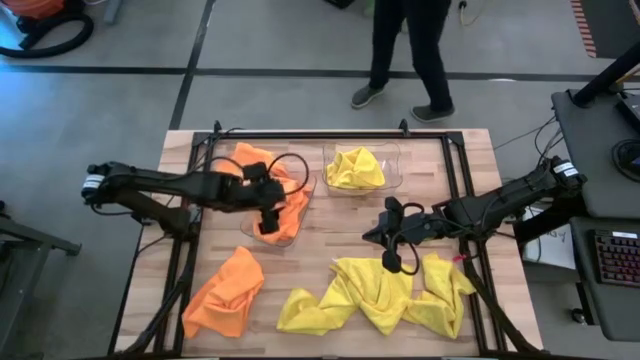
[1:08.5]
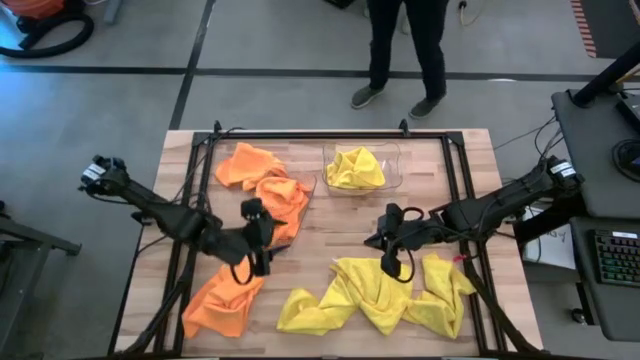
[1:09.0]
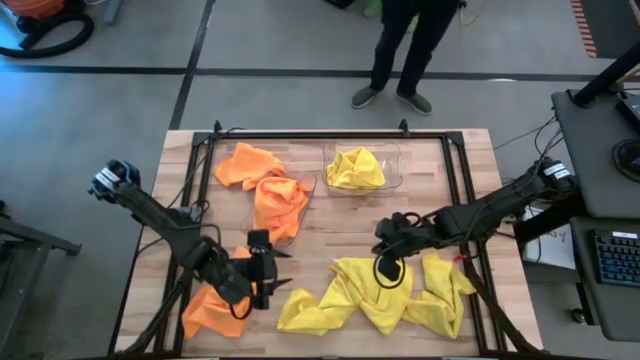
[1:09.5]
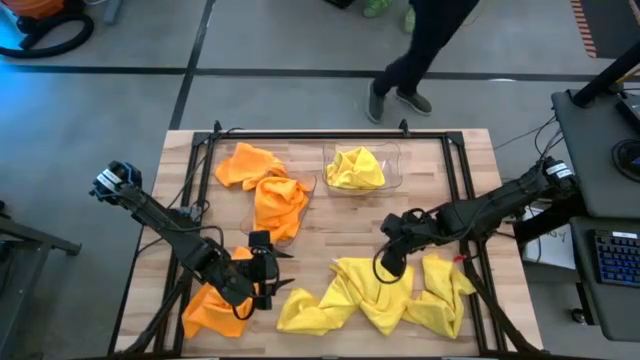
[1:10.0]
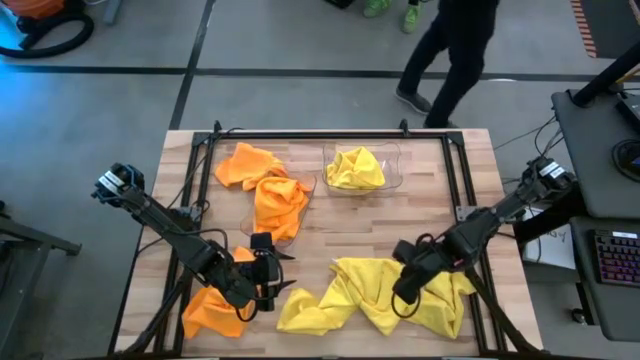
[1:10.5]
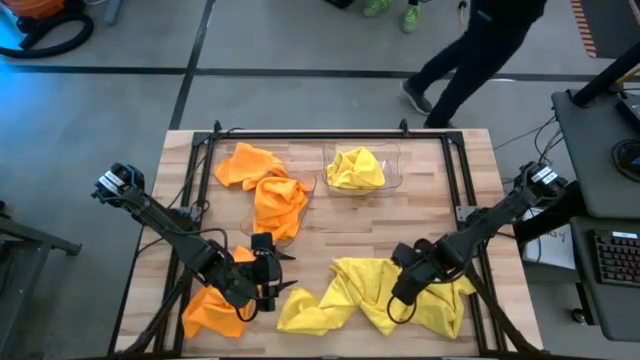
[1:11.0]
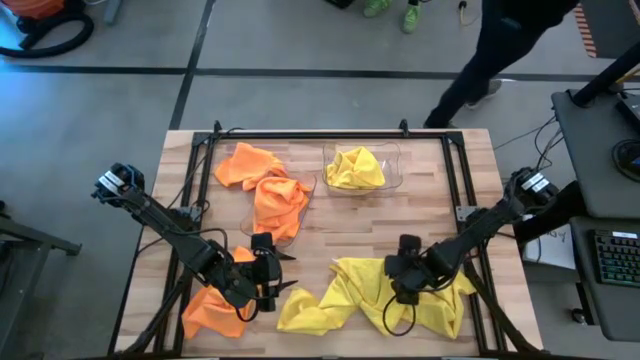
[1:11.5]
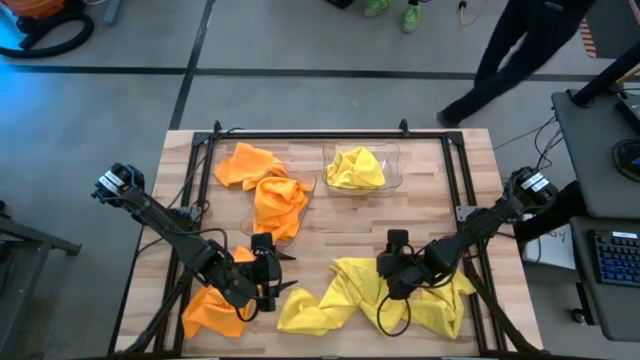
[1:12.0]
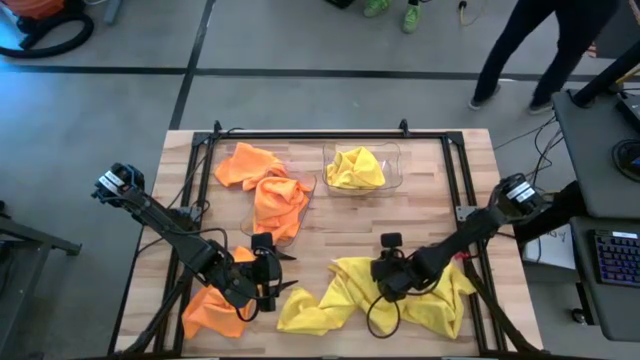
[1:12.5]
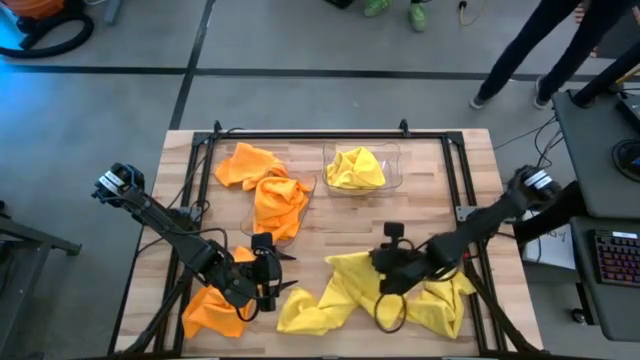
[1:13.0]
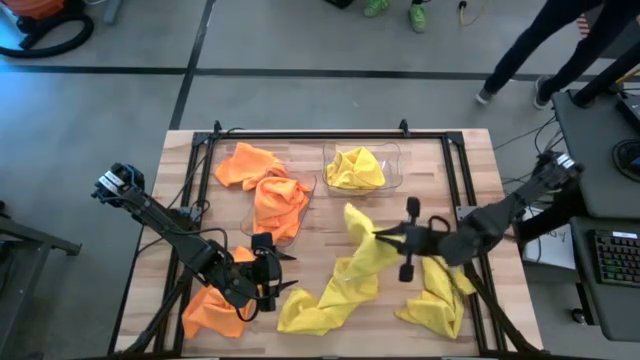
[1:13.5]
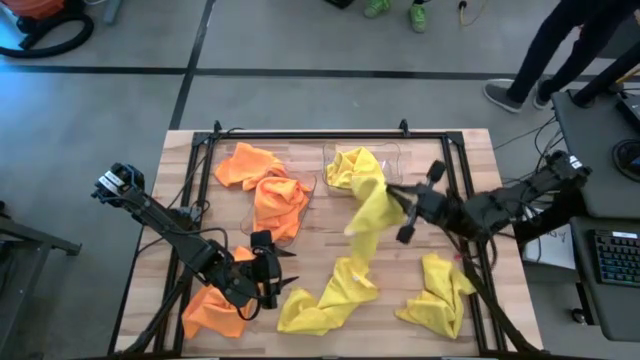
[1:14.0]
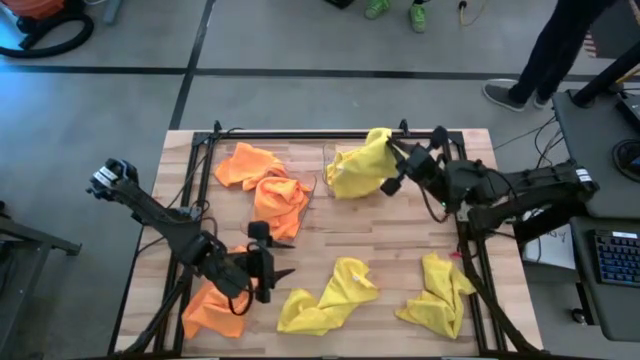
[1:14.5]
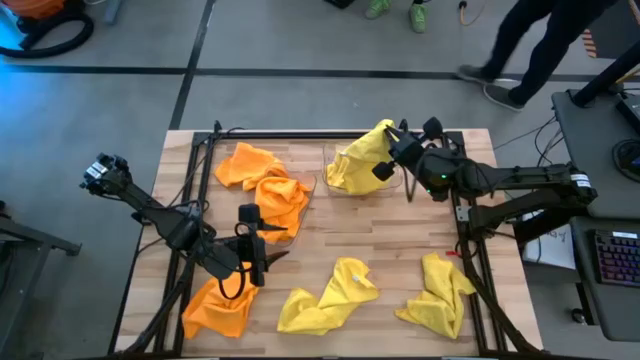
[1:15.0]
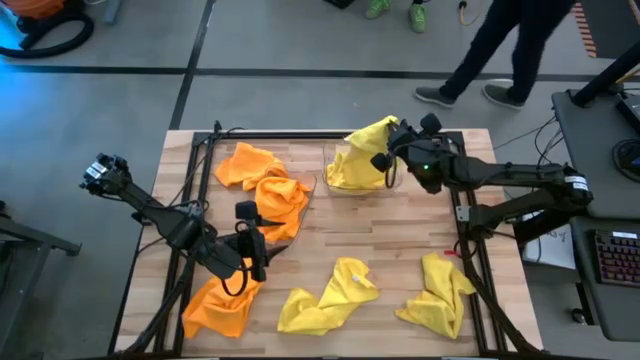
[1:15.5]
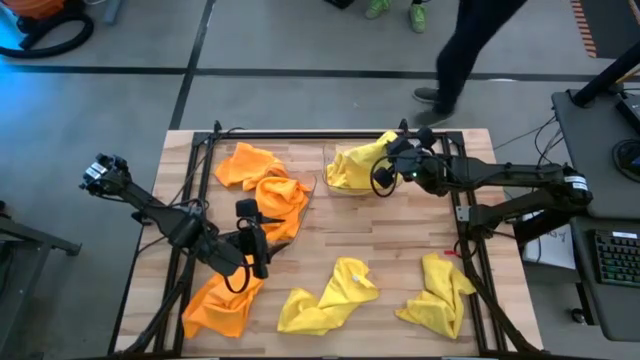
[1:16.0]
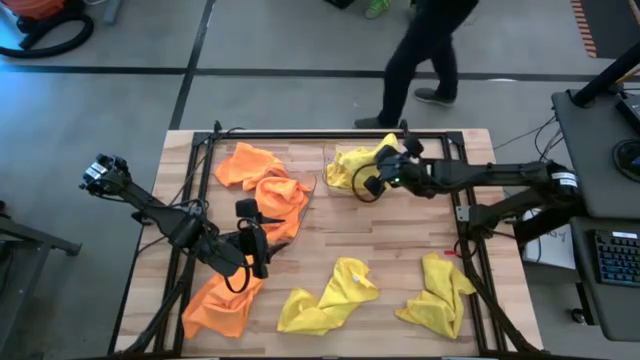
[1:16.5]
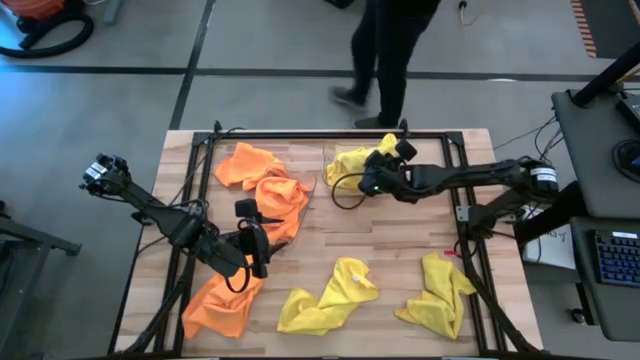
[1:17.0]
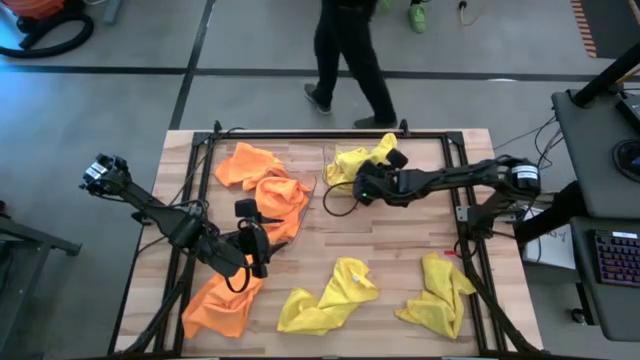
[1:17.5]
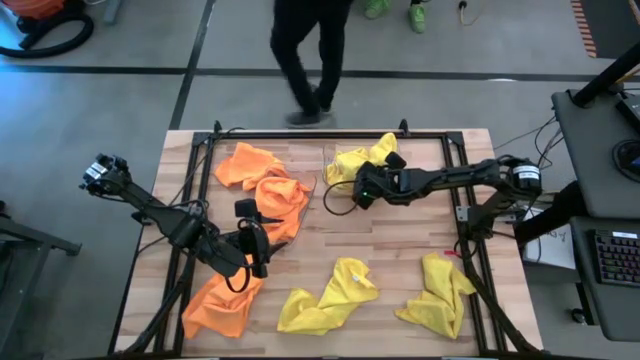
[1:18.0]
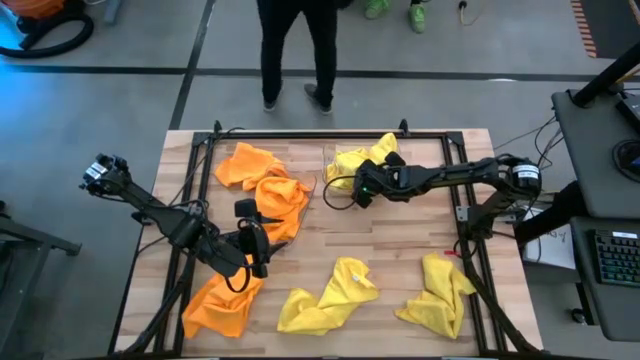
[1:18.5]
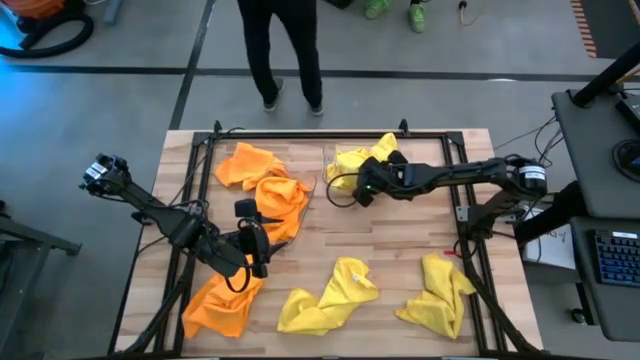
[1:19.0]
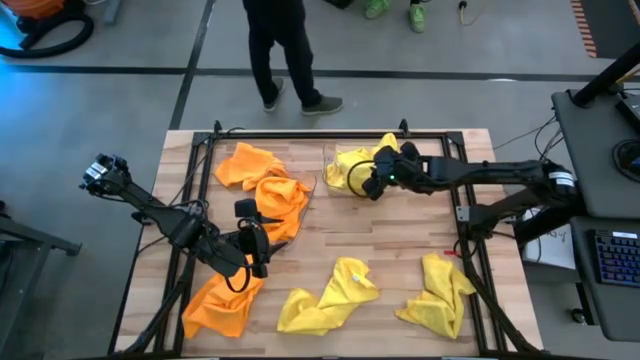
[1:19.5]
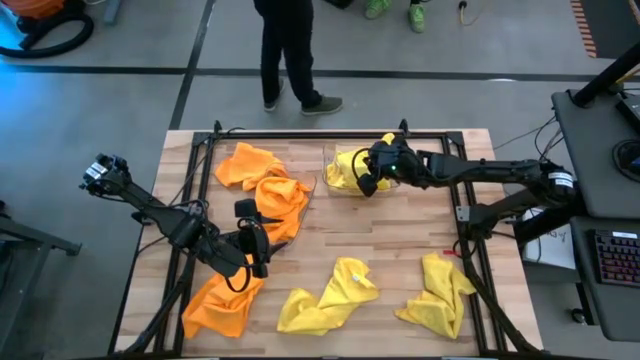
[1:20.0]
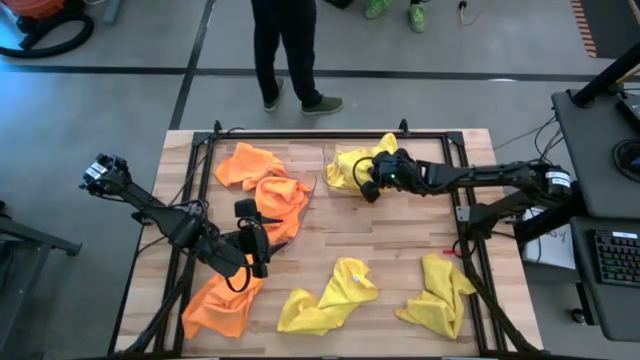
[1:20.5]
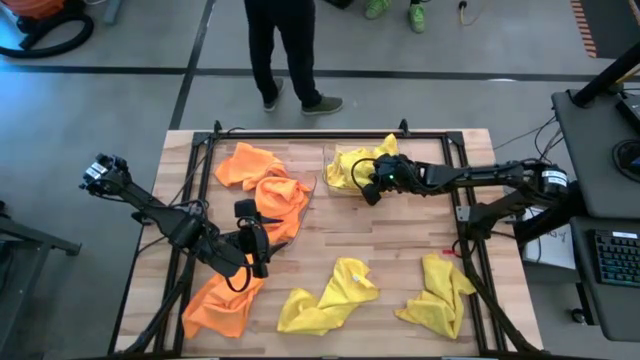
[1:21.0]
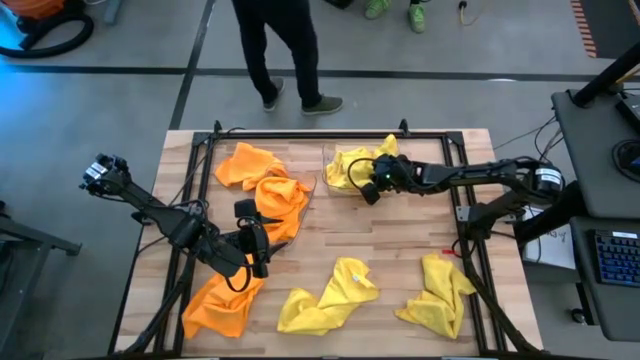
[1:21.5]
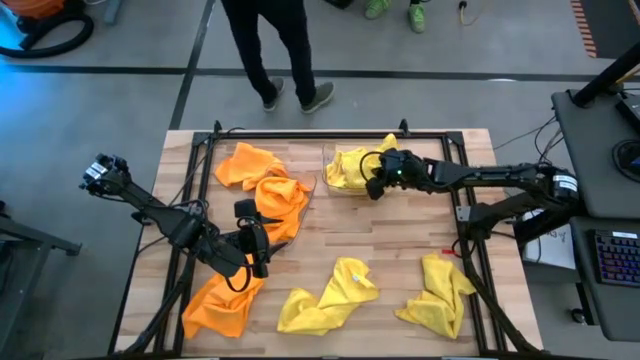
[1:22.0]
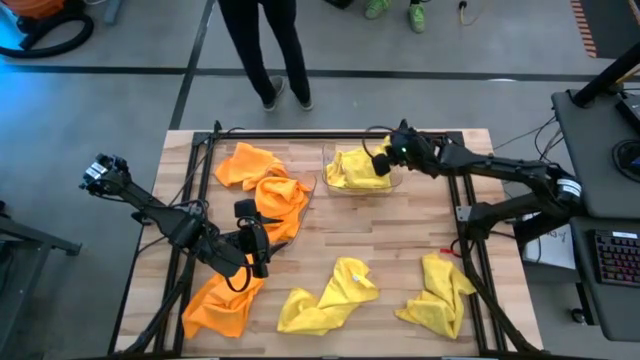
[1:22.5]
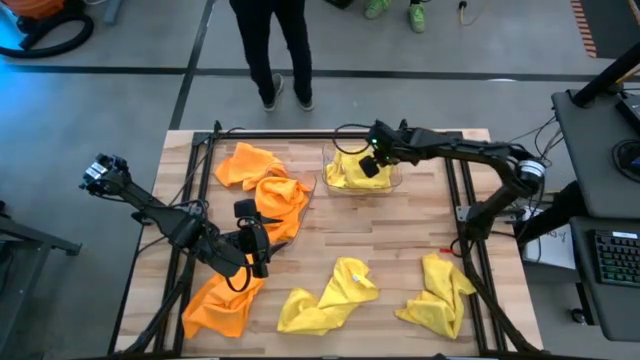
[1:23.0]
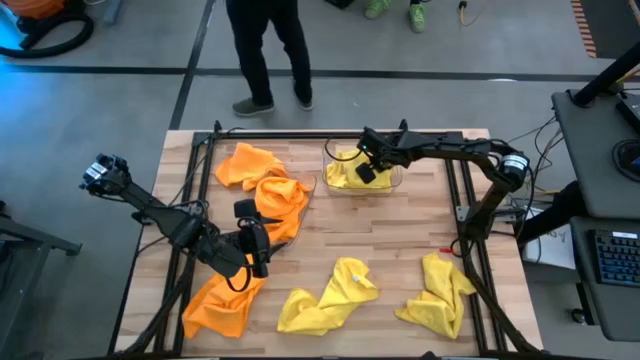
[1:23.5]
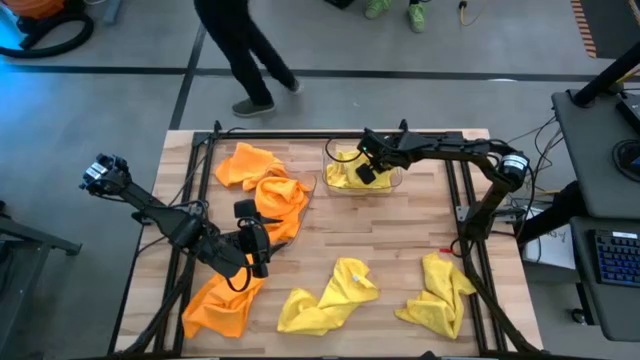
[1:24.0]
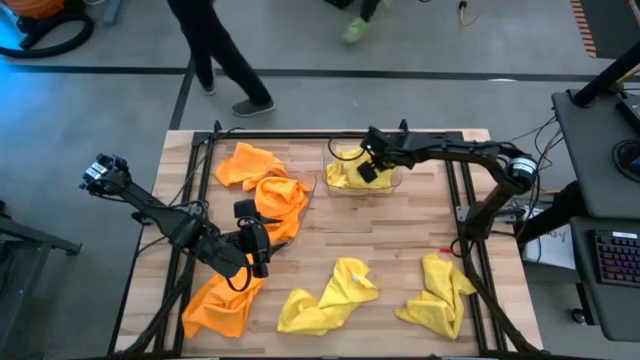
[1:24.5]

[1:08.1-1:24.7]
Task: Sort microfiber towel by color & place in baskets
Put the yellow microfiber towel into the right transparent bin

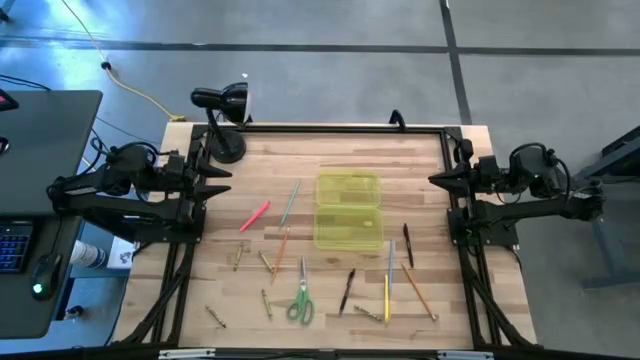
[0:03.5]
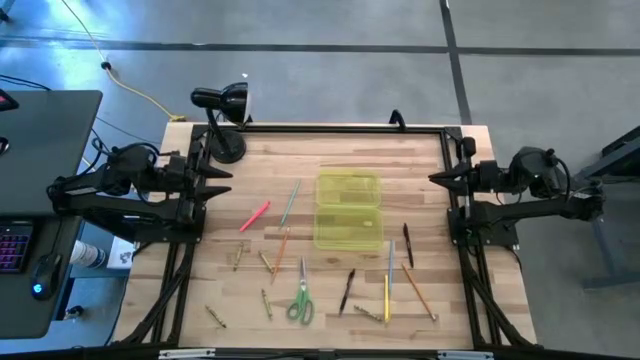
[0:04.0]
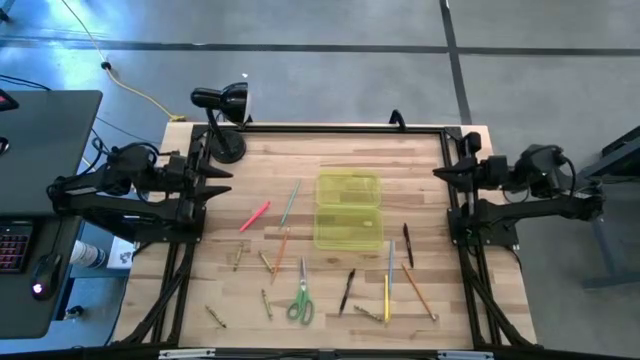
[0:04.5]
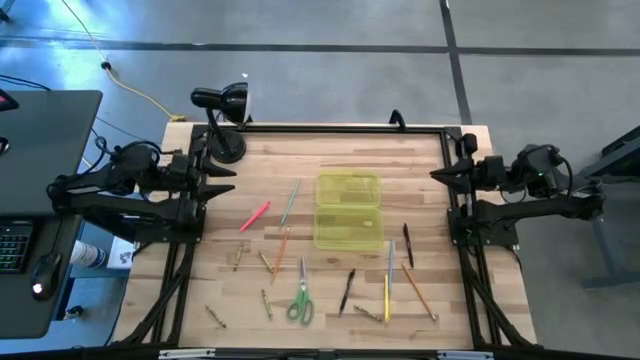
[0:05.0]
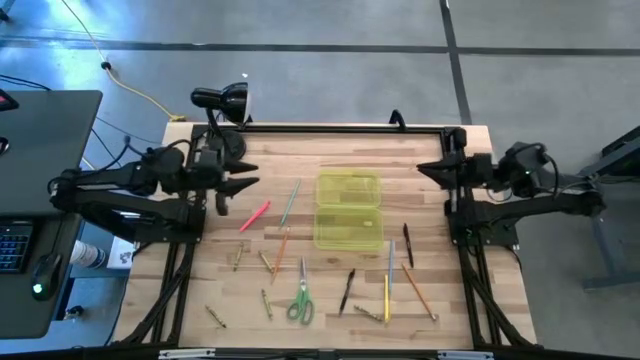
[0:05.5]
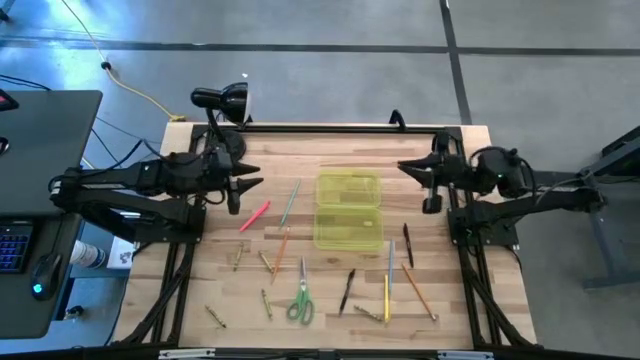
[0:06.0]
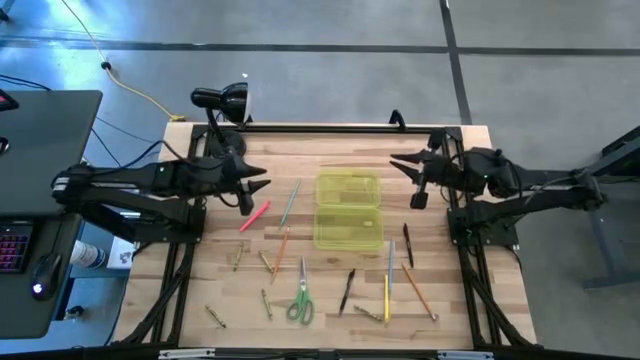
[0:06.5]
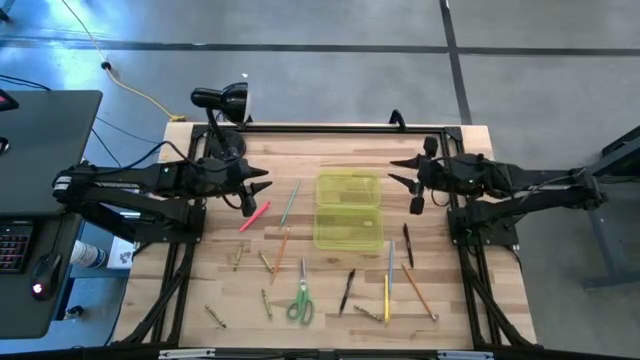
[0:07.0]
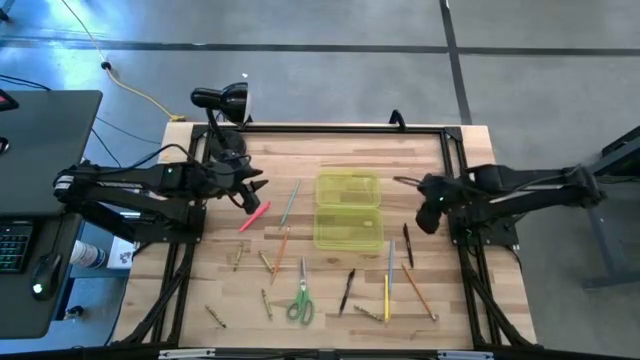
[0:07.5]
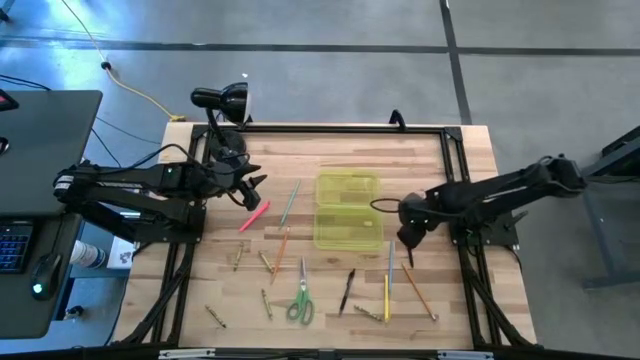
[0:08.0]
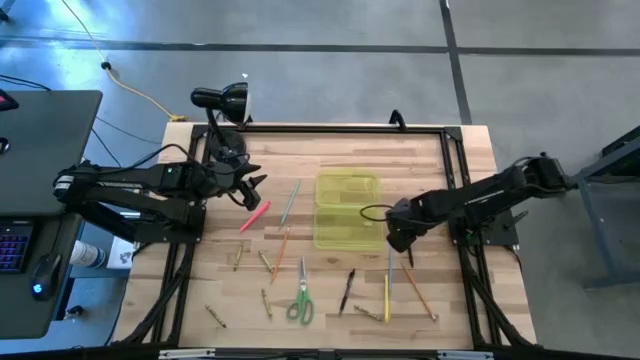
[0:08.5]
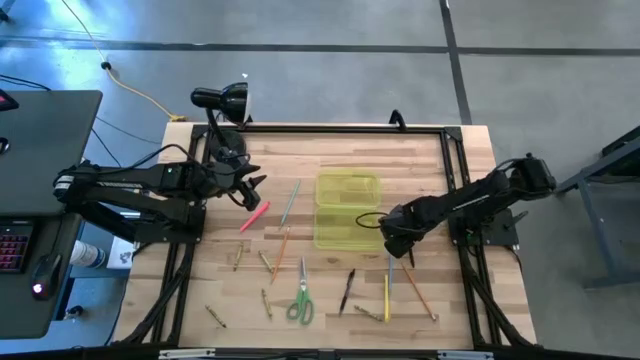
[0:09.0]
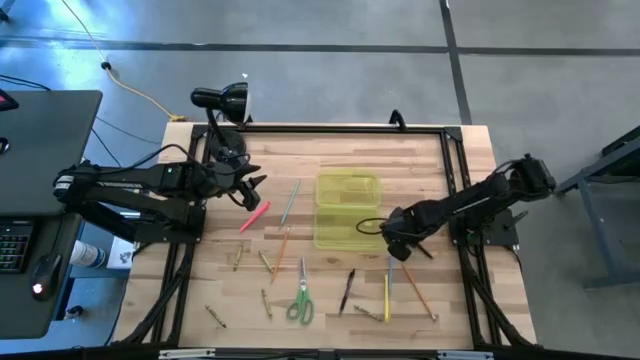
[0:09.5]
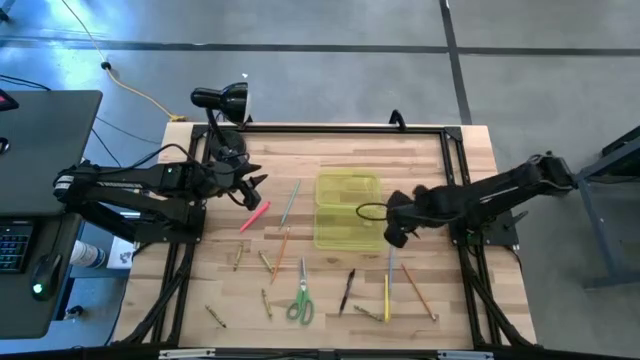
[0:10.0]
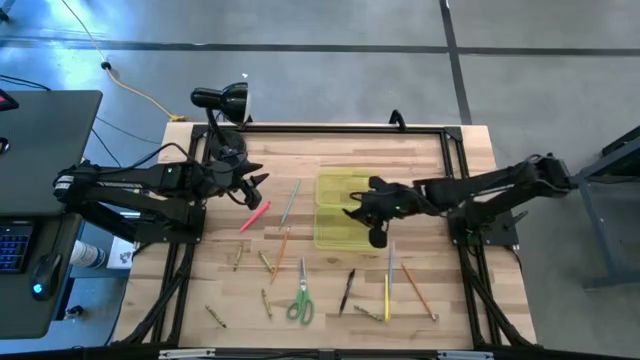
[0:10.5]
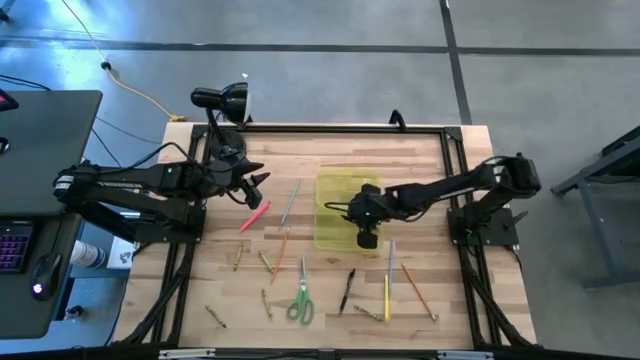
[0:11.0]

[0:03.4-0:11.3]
Task: Pick & place school supplies into a supply box
Put the black pen into the yellow supply box
